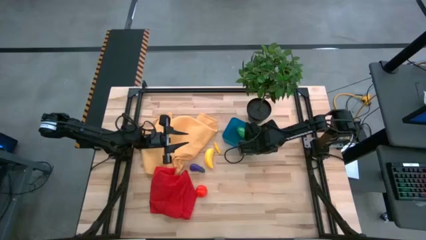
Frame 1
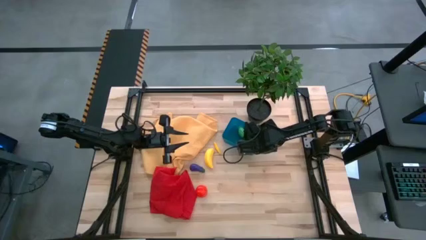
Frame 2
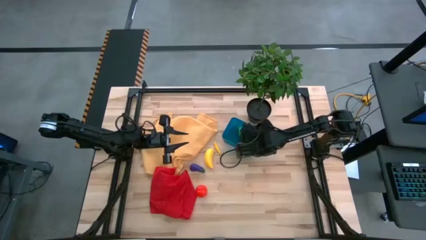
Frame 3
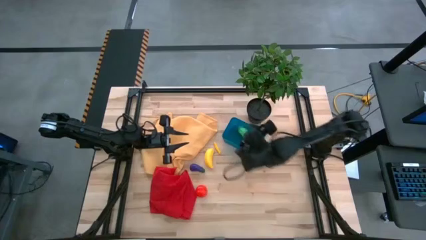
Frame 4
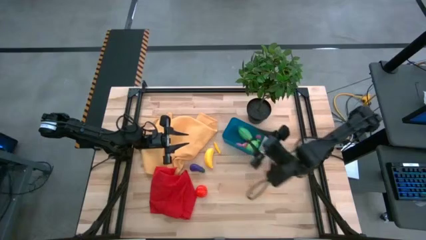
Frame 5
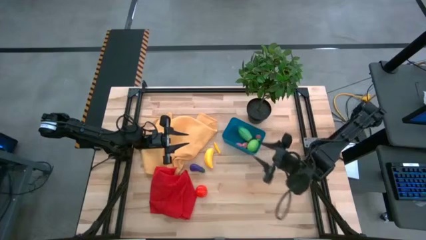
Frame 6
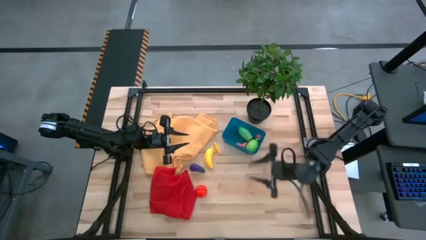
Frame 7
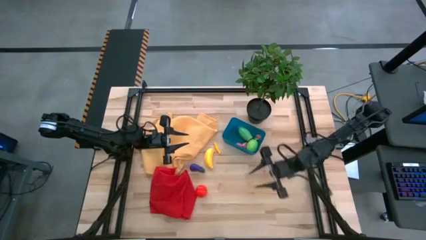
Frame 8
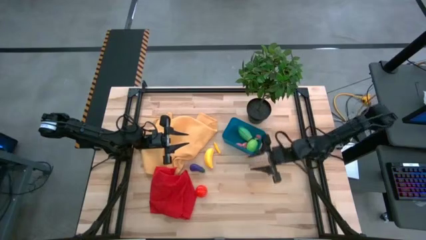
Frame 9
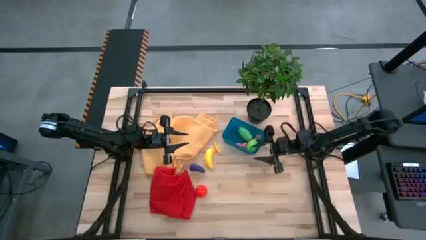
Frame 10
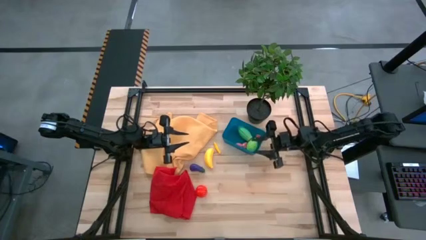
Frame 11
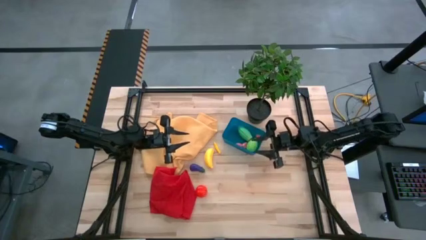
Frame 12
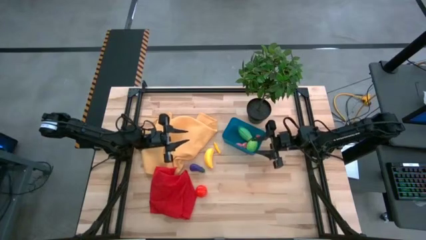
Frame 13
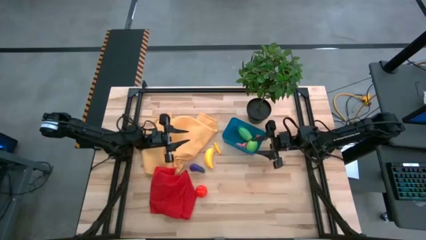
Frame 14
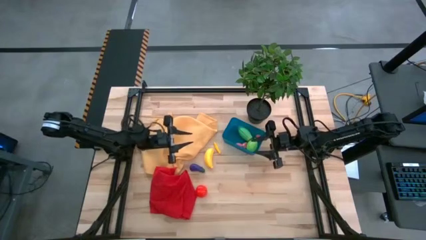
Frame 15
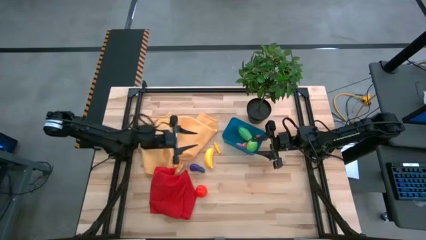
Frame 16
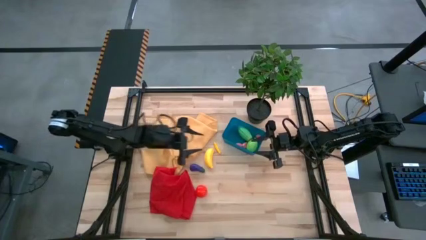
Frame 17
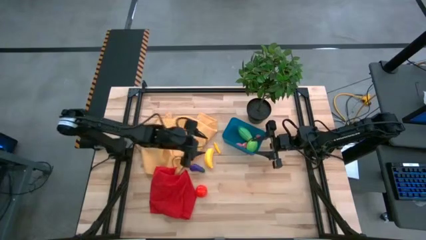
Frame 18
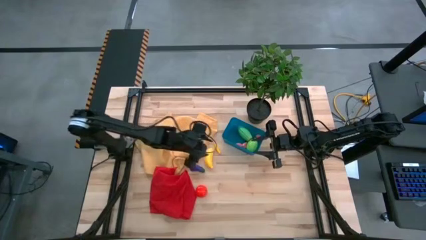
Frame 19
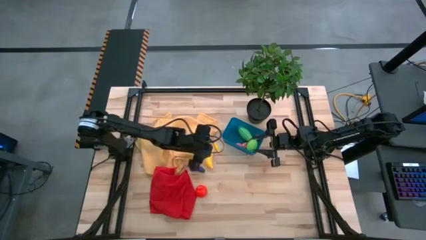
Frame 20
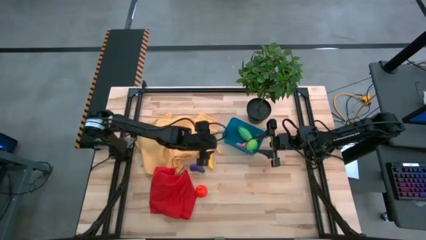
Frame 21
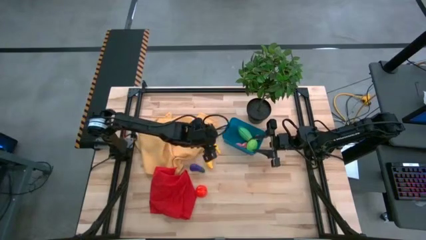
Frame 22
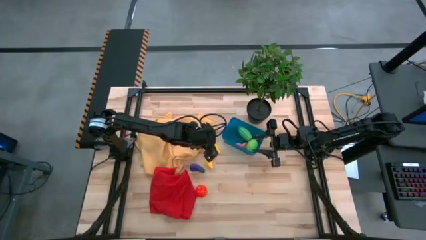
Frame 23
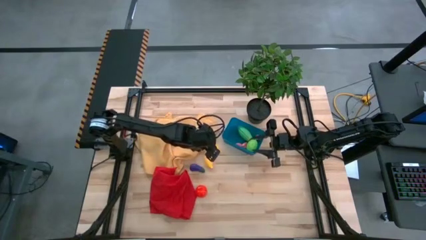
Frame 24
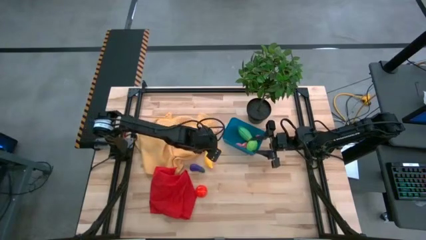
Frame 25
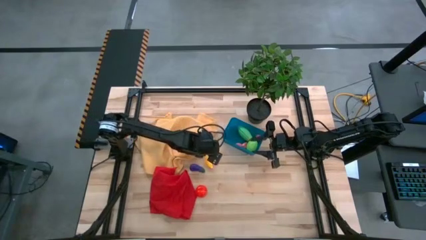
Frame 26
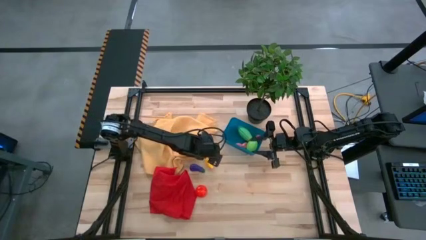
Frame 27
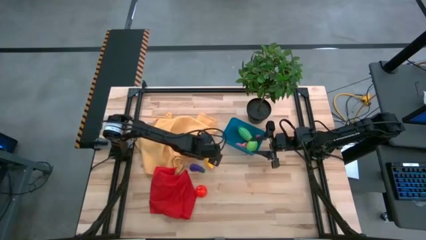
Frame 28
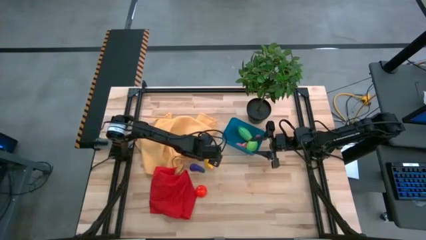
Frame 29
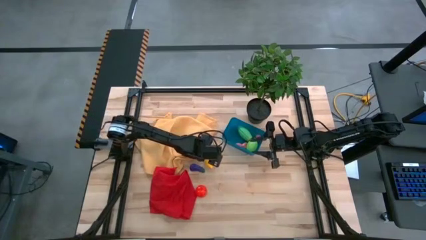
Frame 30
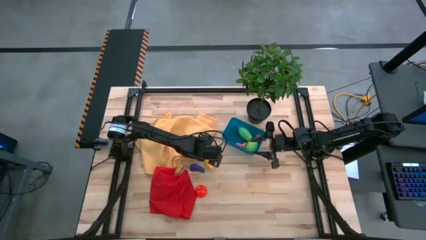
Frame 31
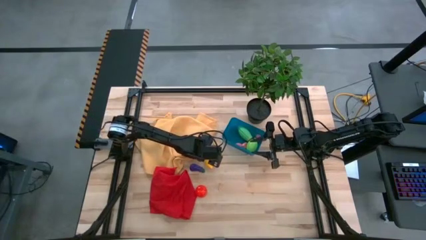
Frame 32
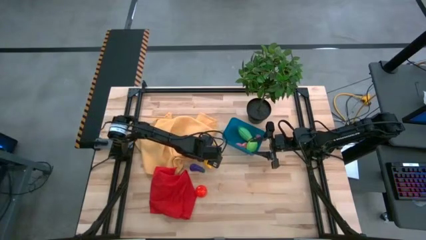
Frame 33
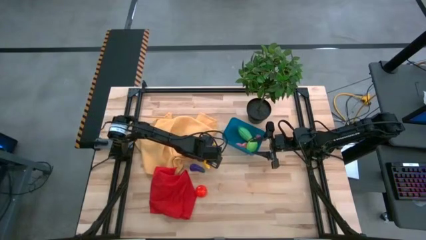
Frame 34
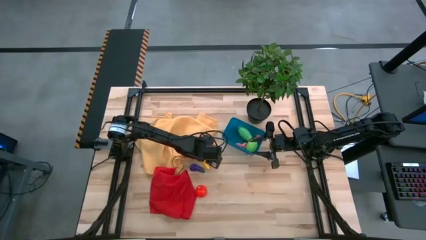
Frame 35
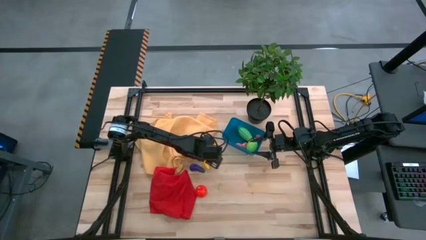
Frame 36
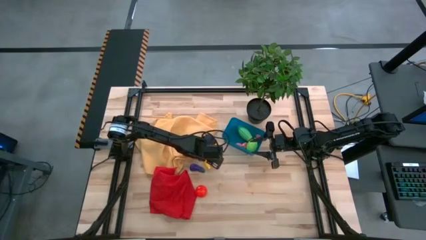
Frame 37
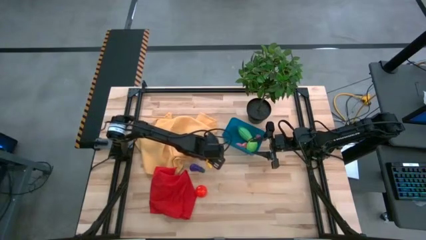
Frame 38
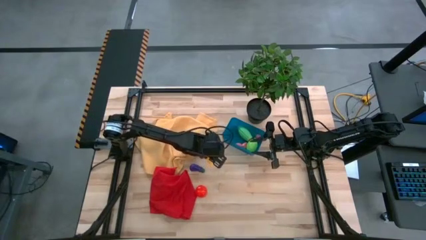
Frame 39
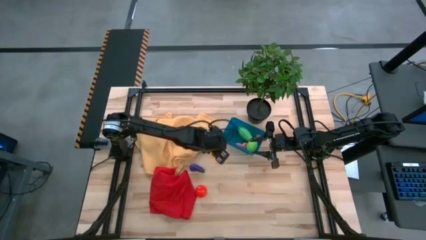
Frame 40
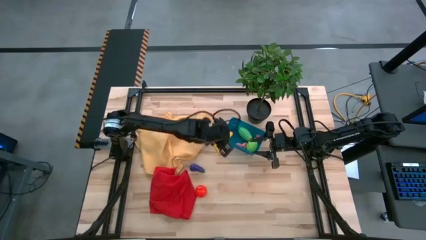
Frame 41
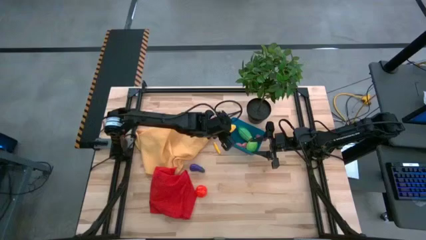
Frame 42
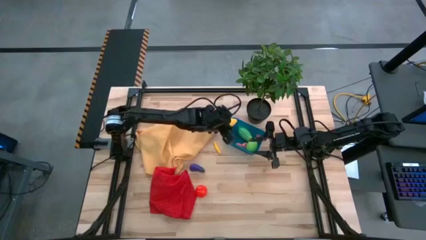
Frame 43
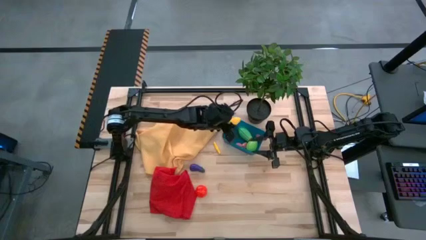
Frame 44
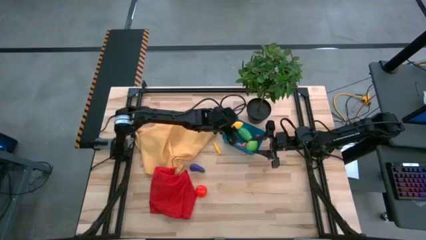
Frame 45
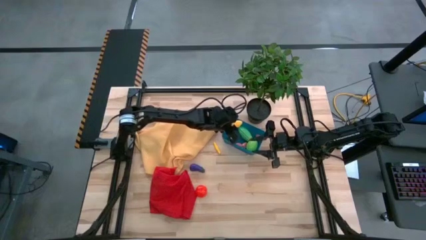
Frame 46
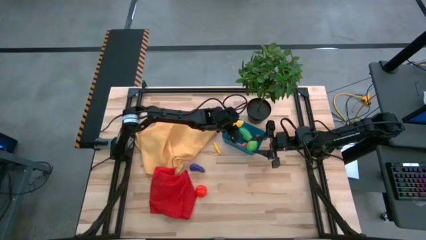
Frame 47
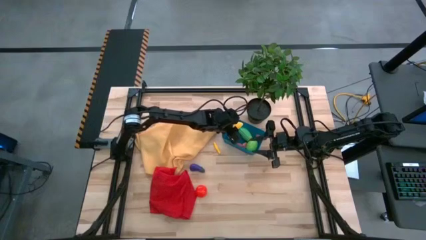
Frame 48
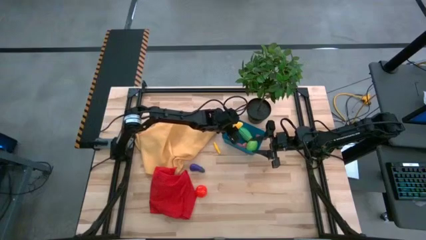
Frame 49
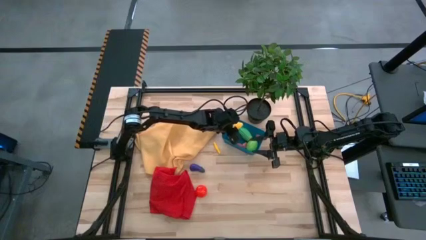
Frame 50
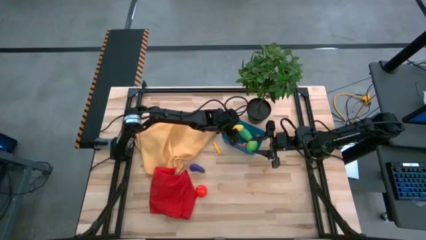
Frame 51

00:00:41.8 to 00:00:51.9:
Task: Pick and placing Produce into tupperware
Put the yellow banana into the blue bin

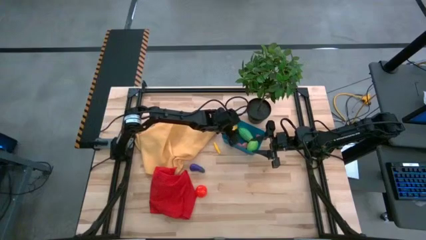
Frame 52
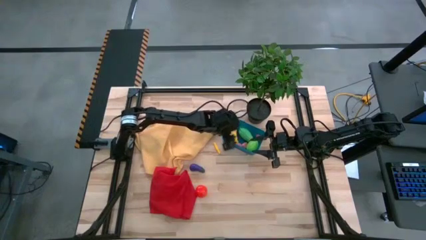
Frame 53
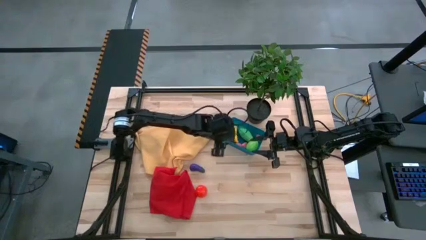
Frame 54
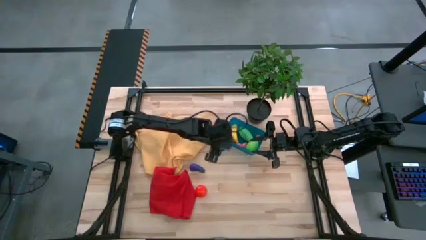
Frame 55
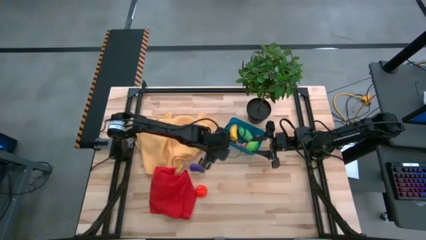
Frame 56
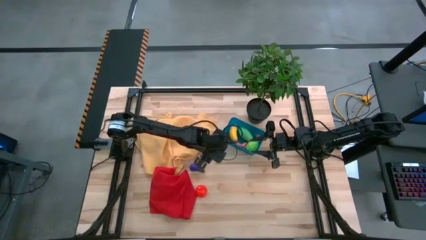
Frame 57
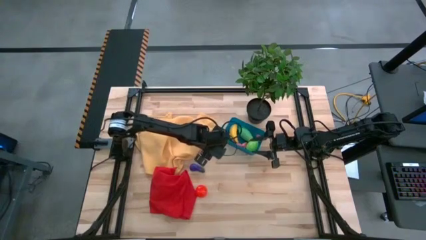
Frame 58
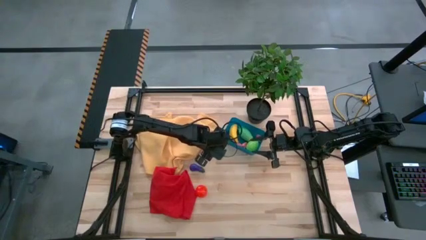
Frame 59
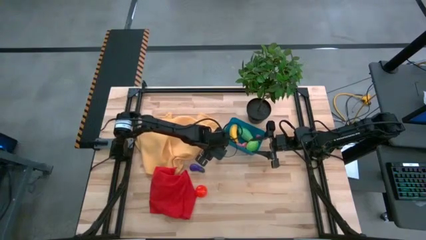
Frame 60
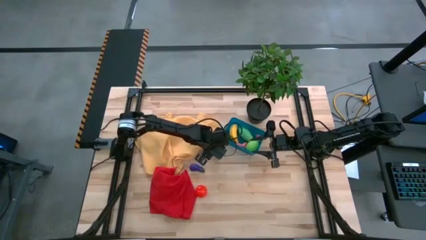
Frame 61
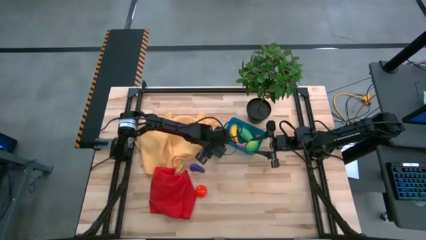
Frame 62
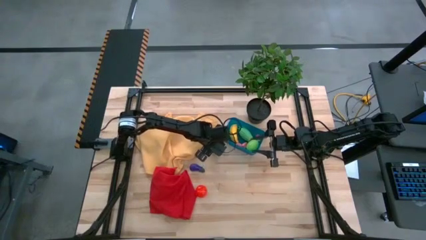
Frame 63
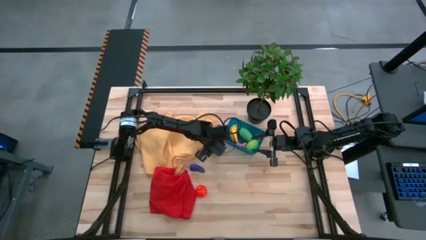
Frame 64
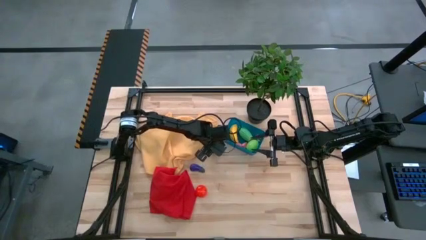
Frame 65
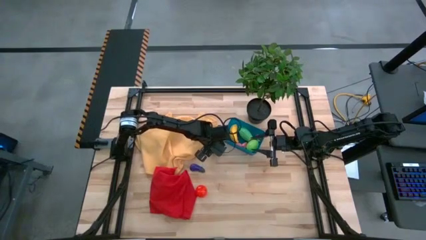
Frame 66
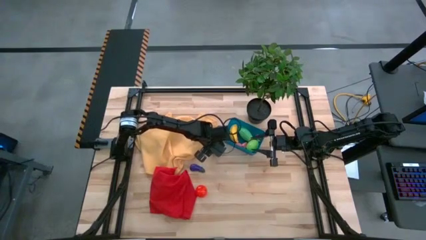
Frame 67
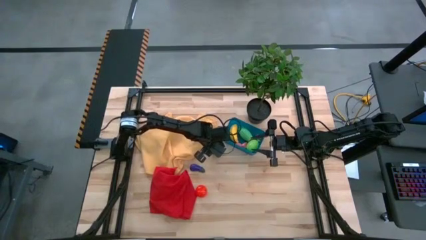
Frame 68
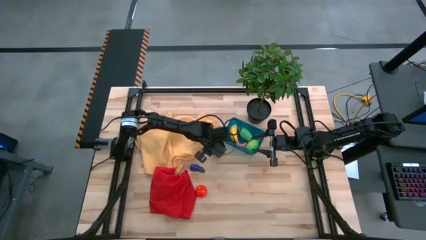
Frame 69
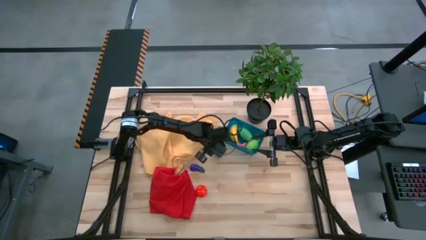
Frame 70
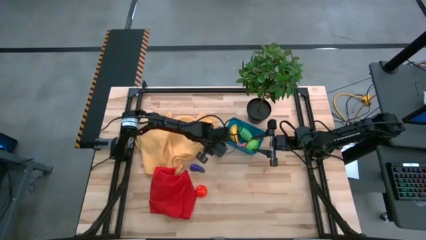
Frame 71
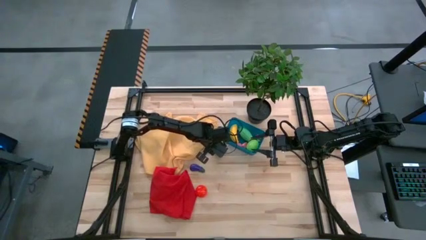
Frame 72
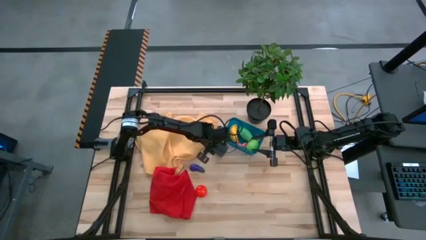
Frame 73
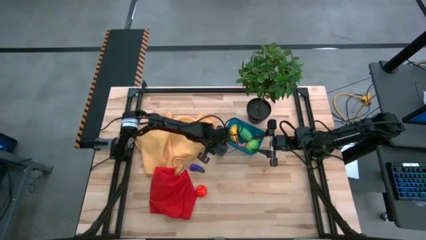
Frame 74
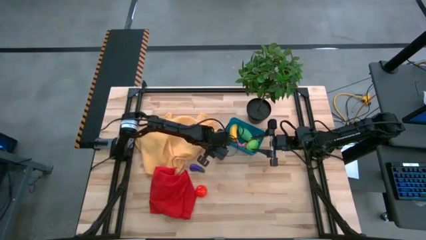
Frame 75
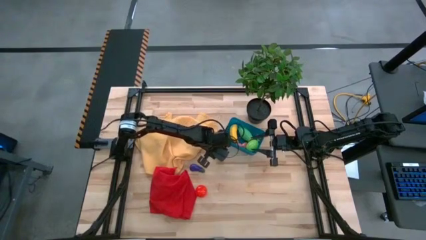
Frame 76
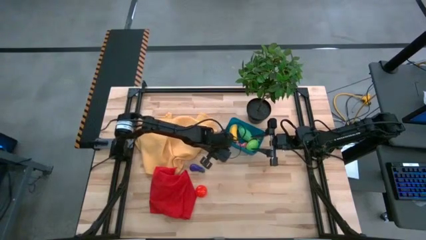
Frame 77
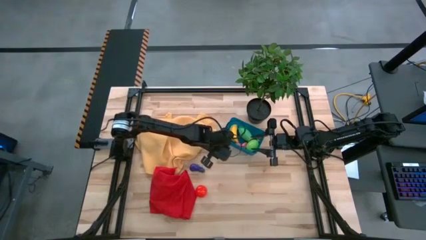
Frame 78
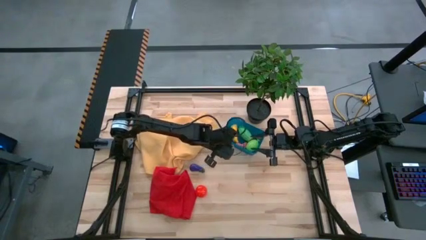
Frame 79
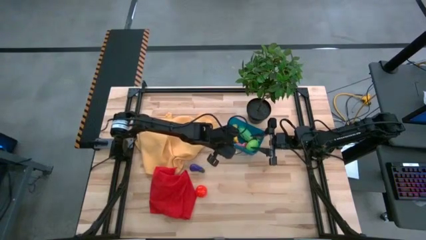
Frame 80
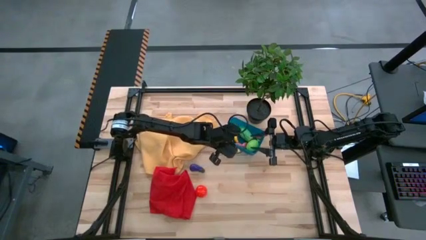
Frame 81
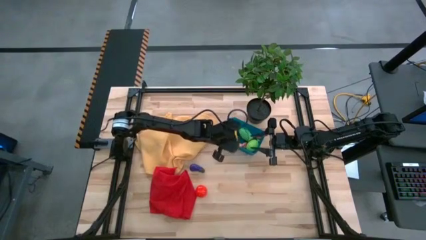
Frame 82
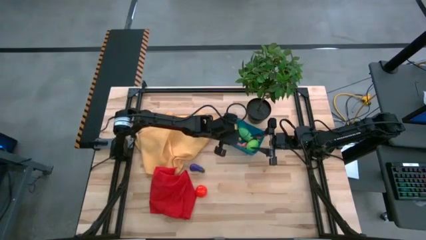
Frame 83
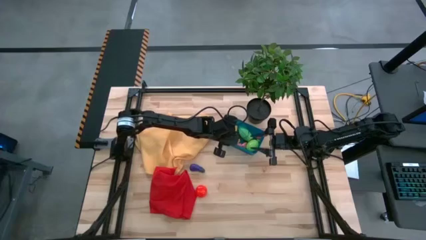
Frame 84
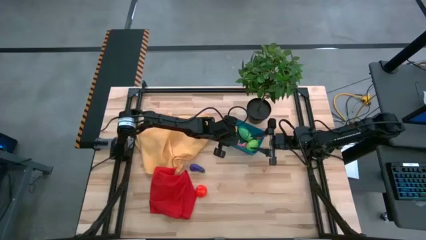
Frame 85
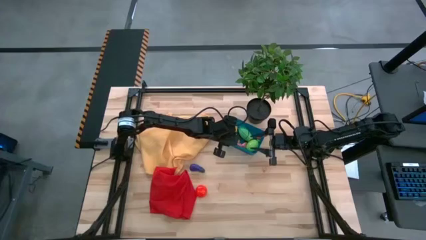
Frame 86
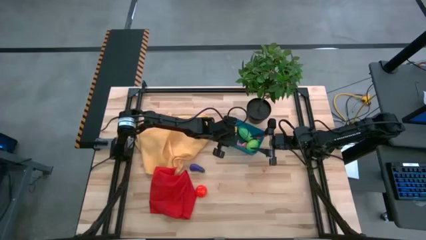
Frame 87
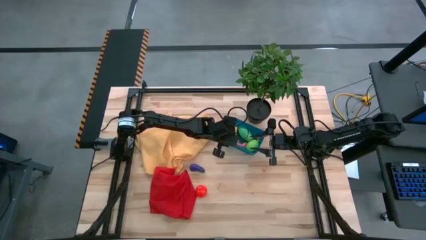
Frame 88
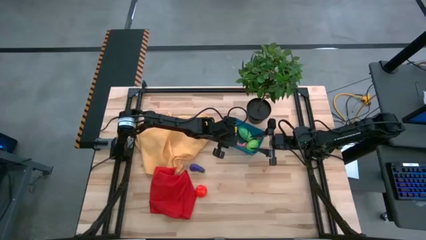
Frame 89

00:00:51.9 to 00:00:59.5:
Put the yellow corn into the blue bin
